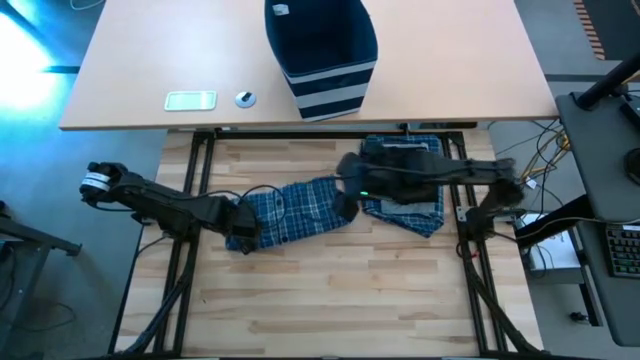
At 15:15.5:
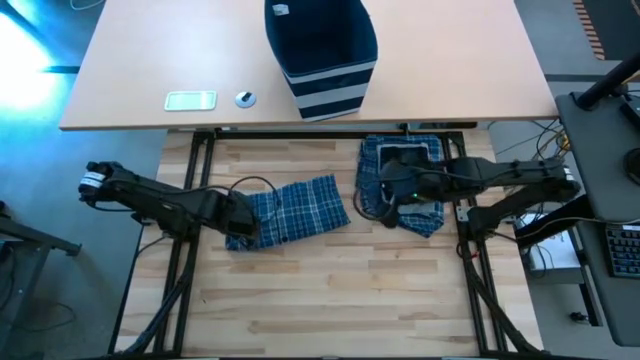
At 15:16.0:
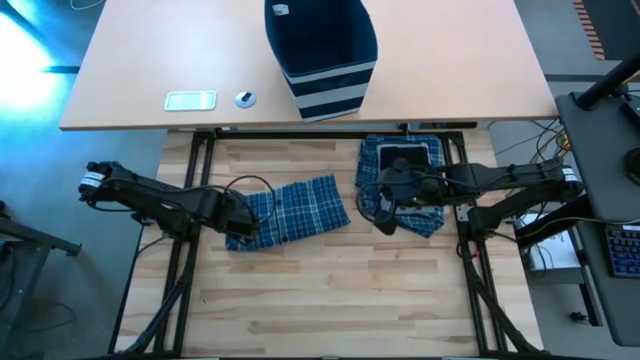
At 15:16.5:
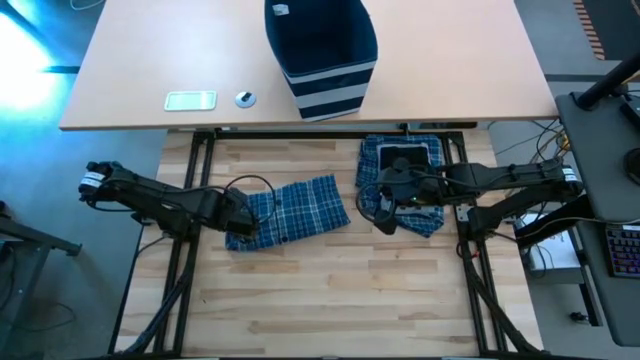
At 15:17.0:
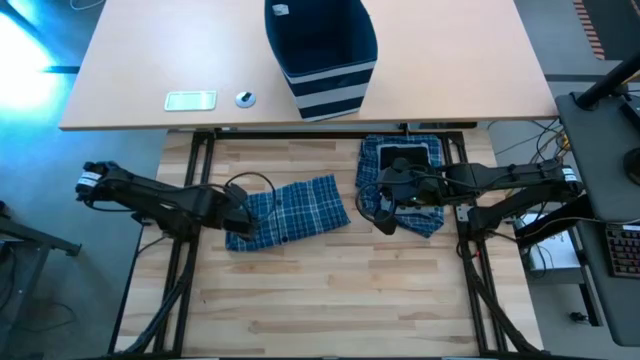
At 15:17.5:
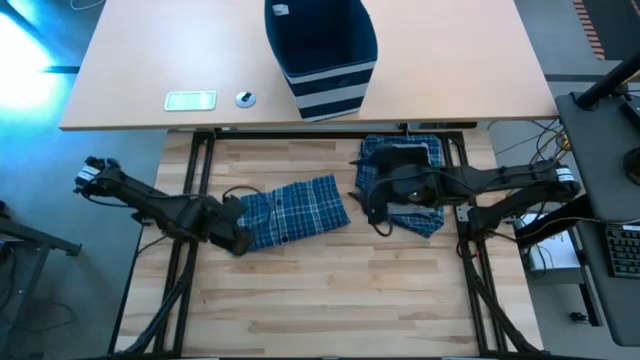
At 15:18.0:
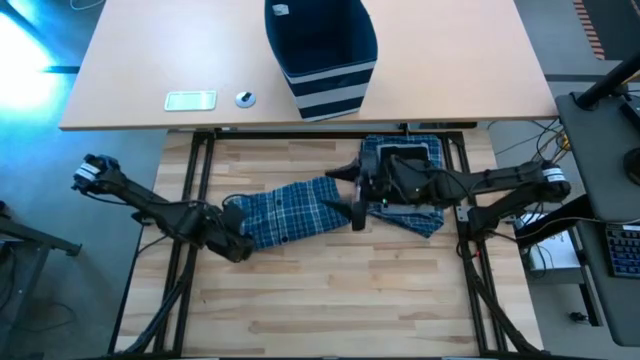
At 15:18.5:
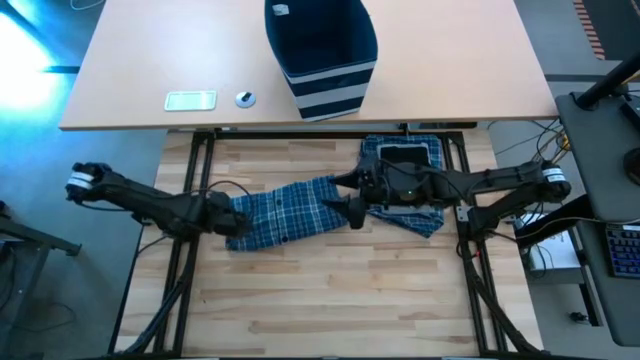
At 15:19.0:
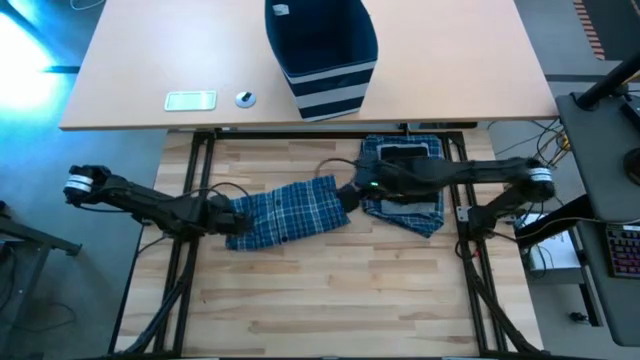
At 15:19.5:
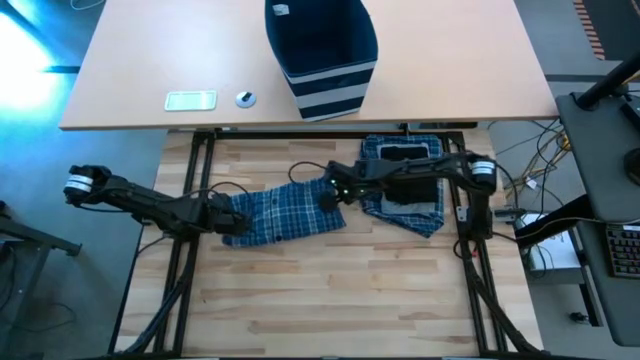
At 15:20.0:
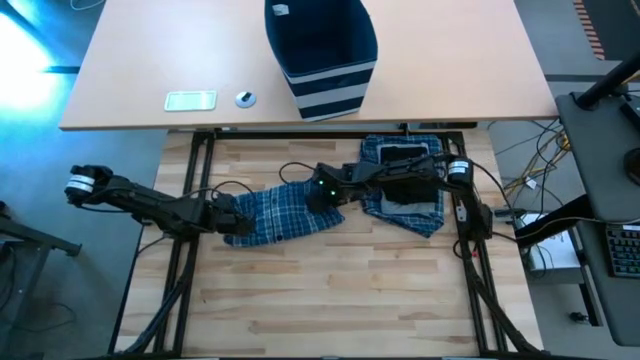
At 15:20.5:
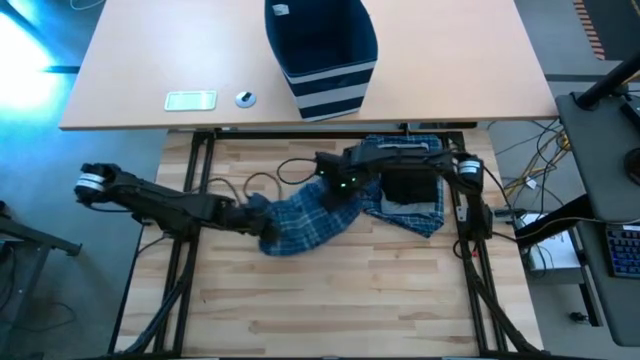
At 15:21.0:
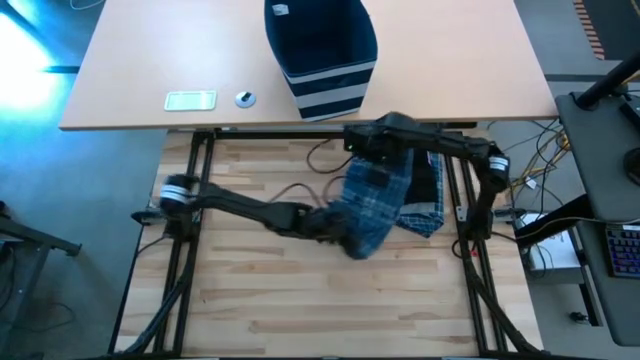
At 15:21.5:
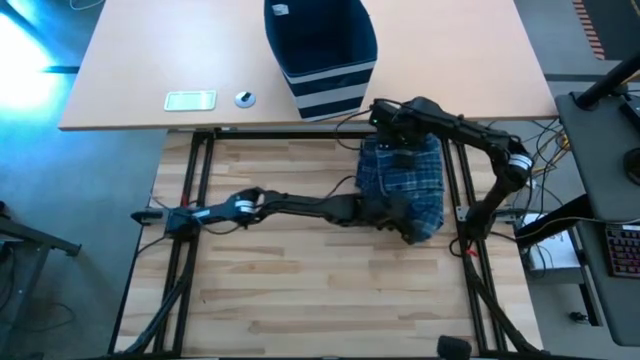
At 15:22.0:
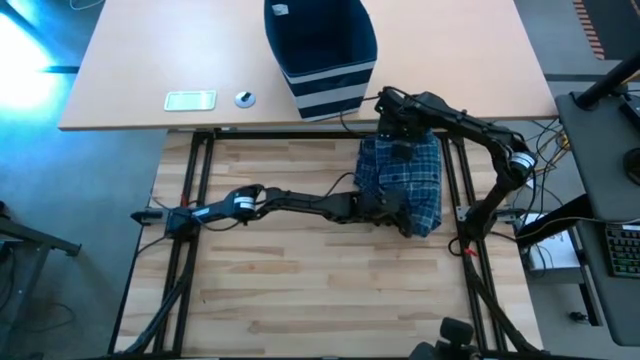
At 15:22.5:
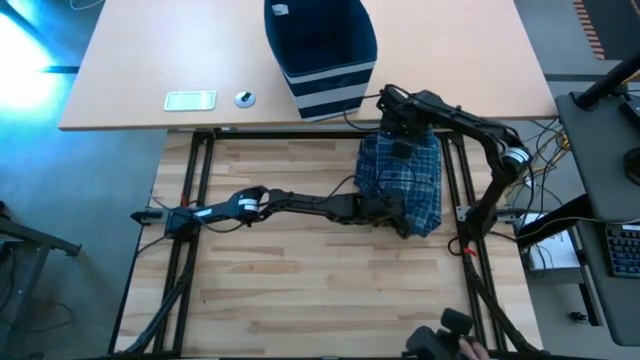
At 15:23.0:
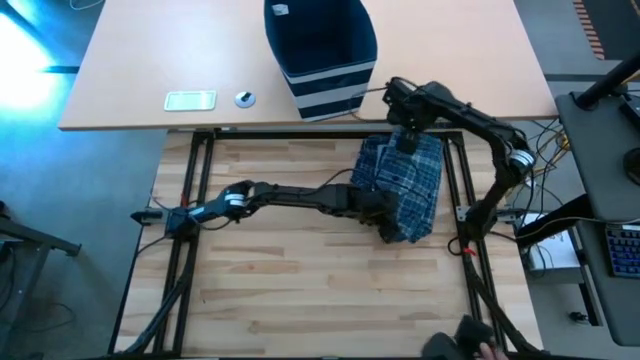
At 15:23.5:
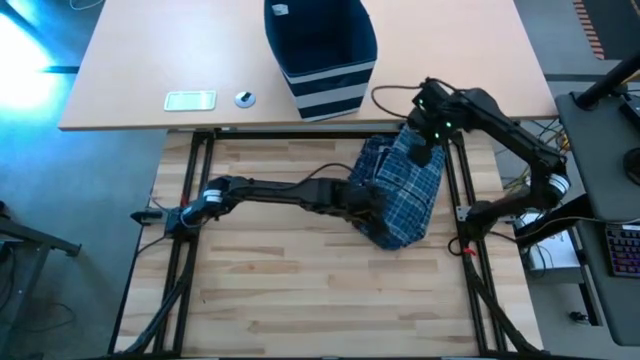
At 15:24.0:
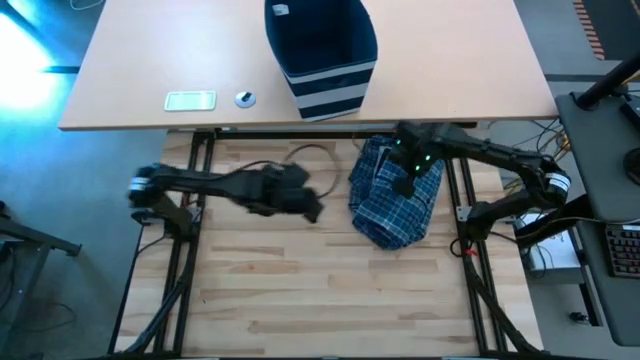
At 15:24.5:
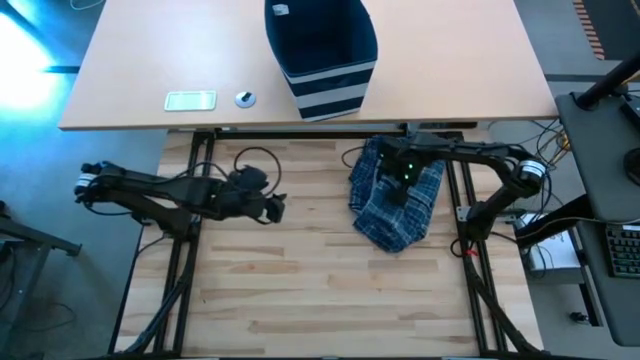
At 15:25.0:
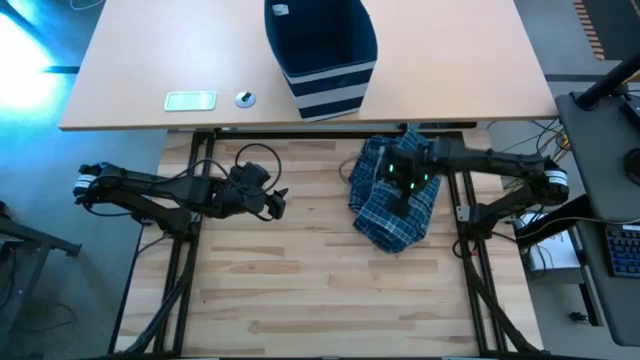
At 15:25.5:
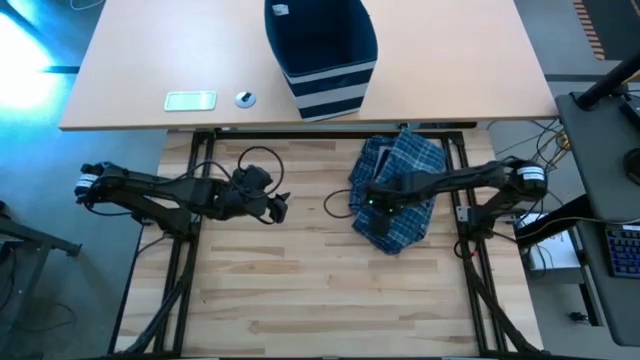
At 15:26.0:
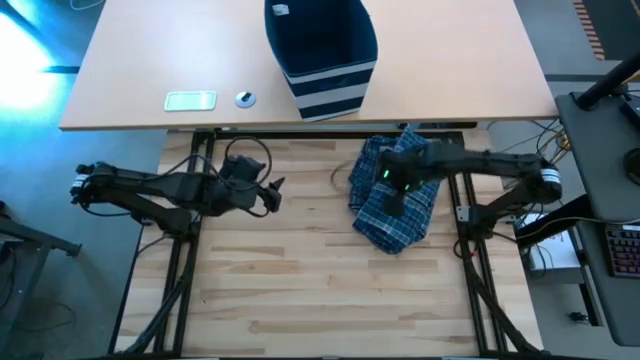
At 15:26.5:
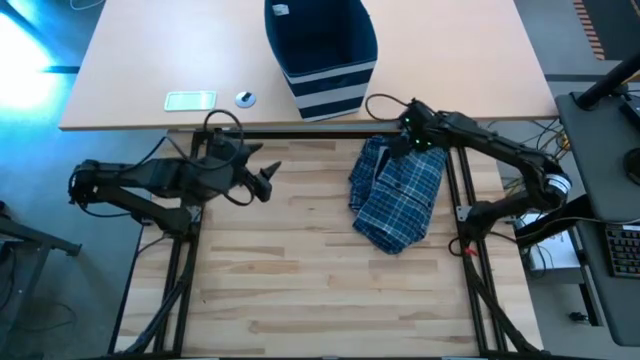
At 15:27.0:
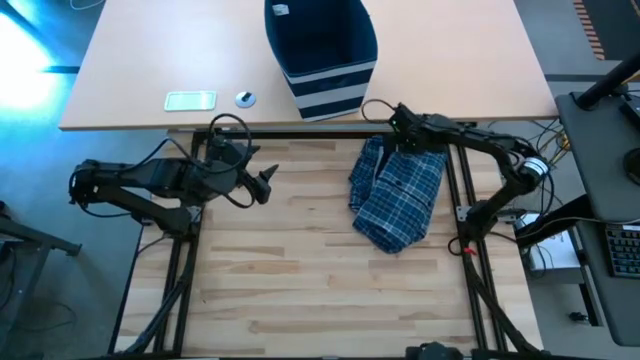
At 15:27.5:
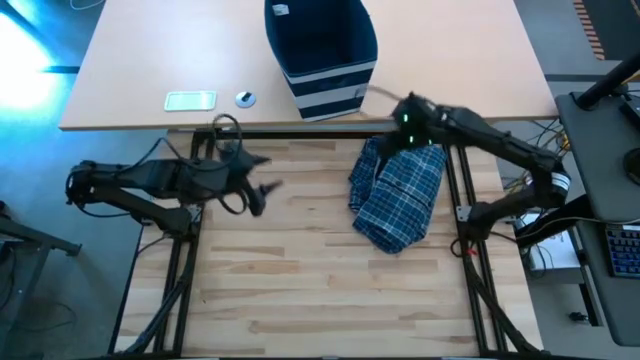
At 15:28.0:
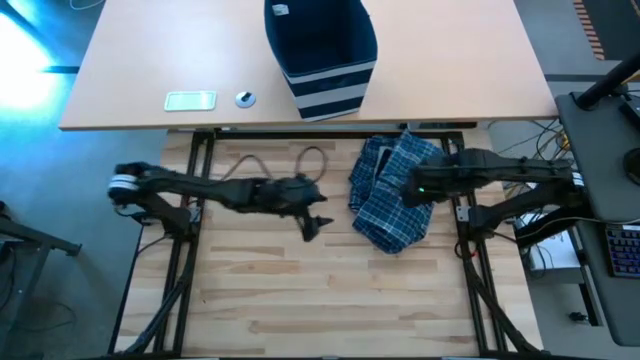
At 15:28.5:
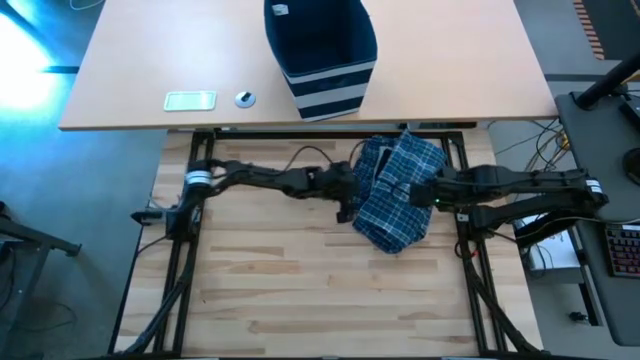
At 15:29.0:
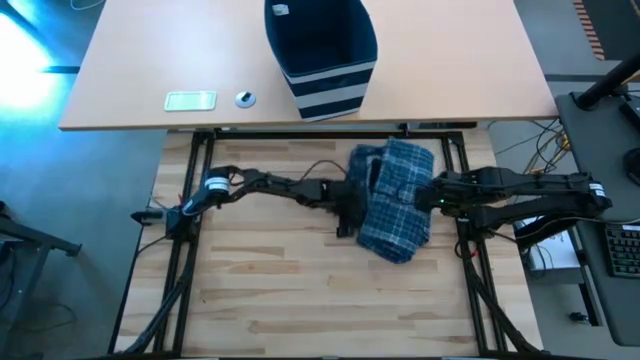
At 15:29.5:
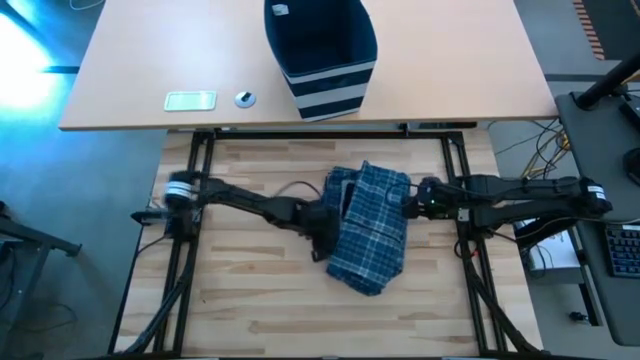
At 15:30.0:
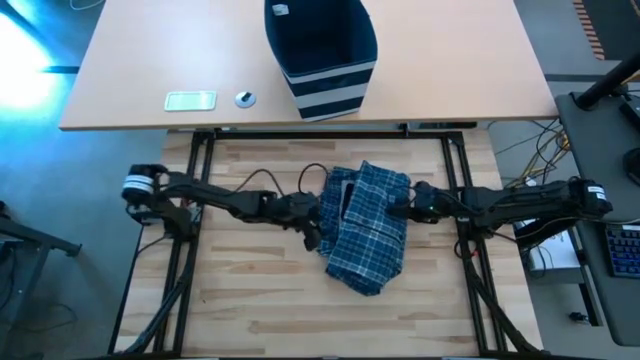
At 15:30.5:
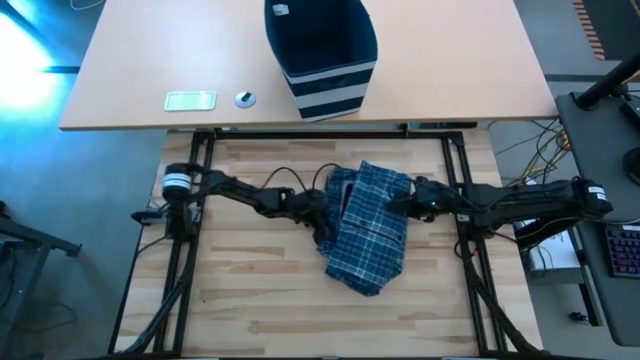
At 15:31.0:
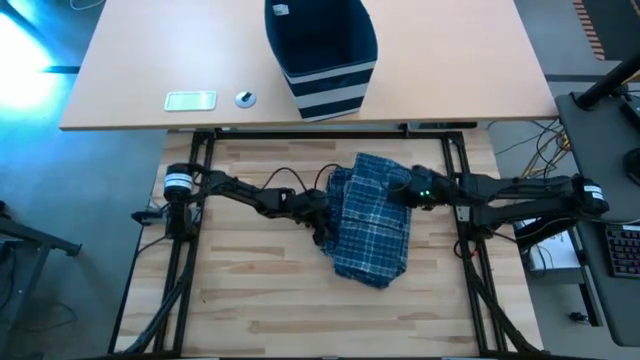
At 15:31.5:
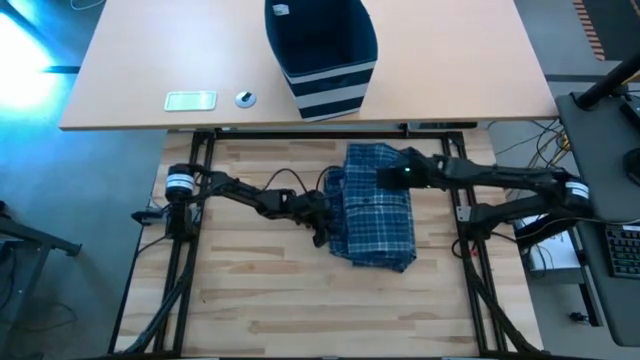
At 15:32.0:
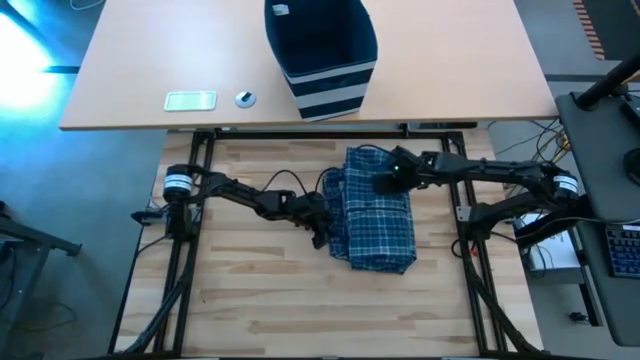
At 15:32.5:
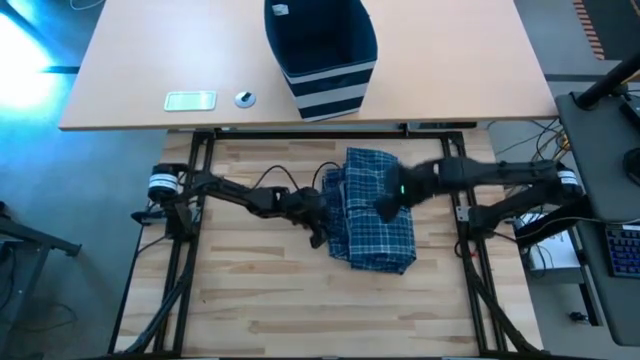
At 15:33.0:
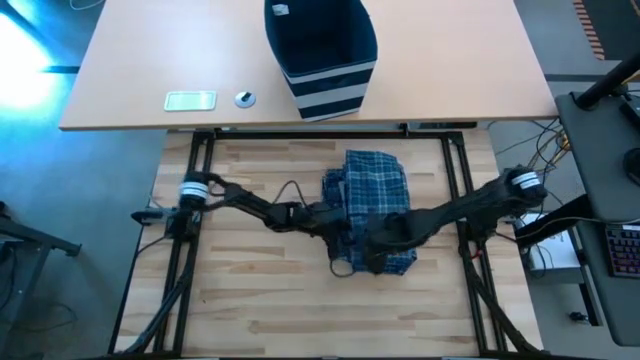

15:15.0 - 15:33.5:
Task: Fold Laundry from Bin
Stack the blue patterned long sleeve on the black boxer short

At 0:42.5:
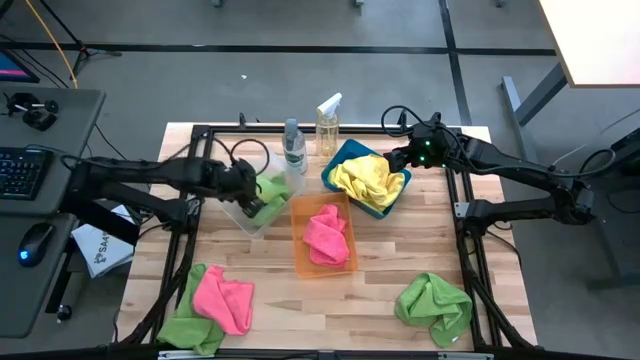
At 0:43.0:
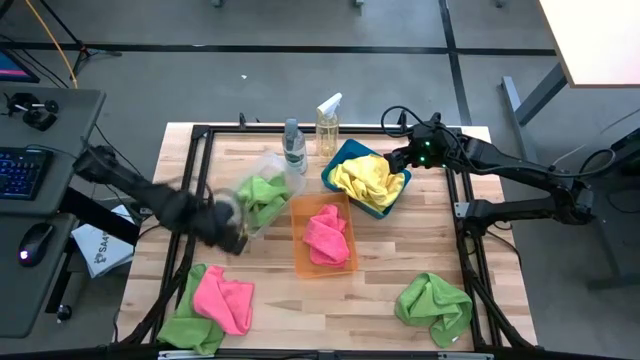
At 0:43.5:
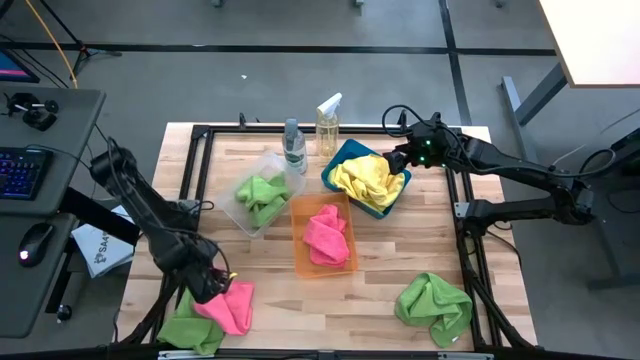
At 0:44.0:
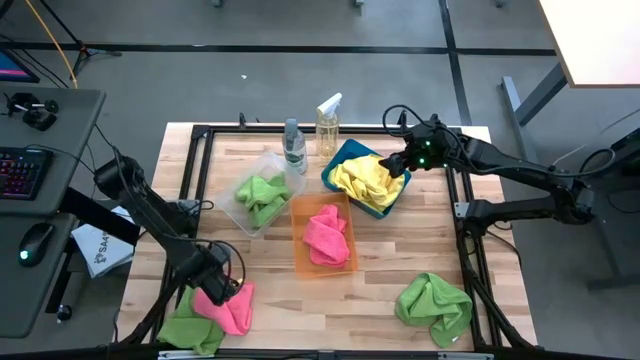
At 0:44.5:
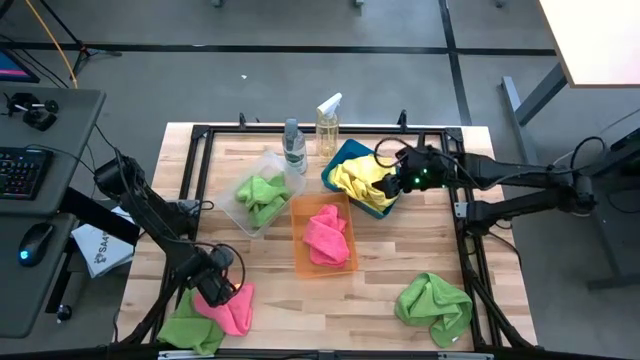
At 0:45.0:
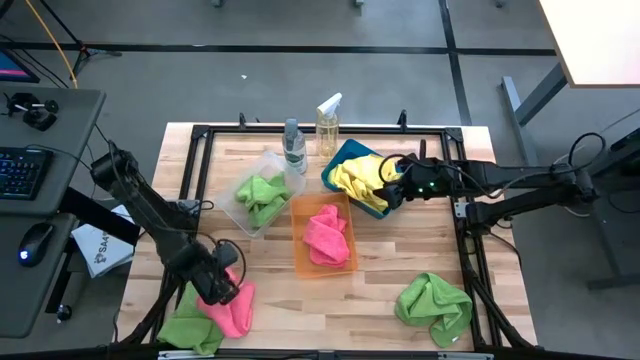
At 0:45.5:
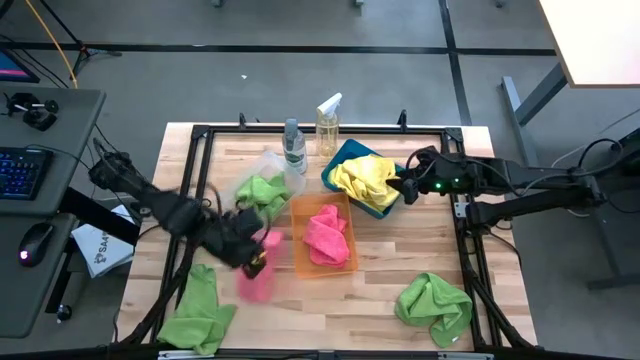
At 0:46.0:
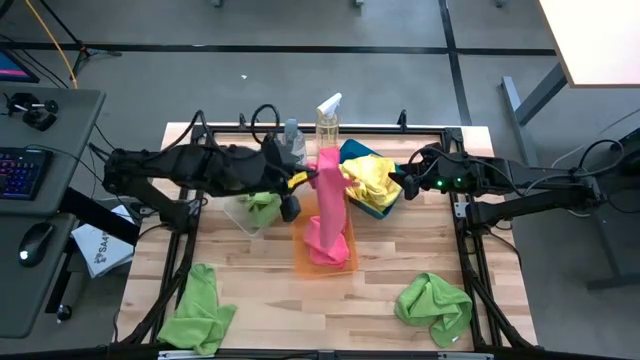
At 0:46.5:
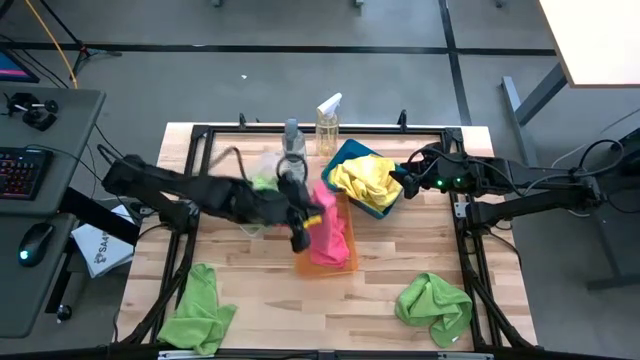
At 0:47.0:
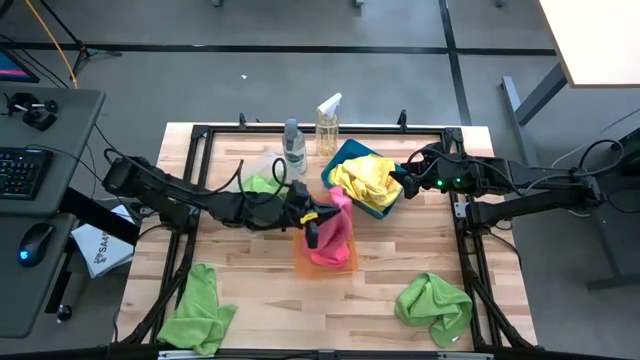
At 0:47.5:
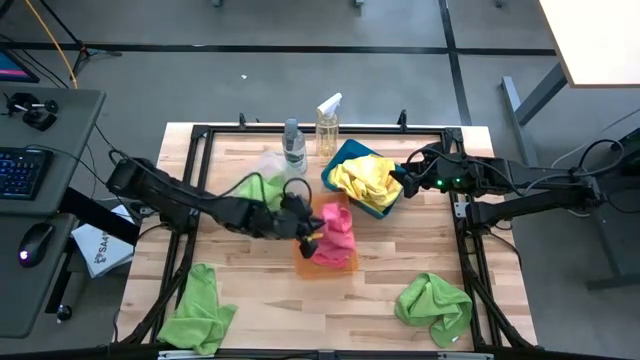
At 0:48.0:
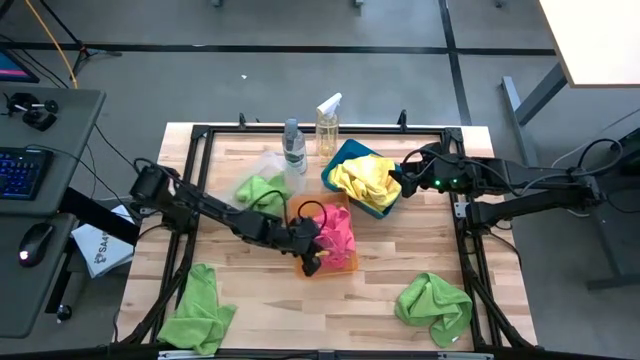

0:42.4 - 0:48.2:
Task: Sort microfiber towel by color & place in baskets
Put the pink towel into the orange bin
